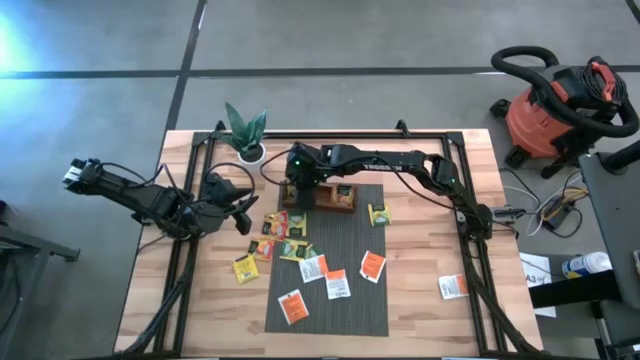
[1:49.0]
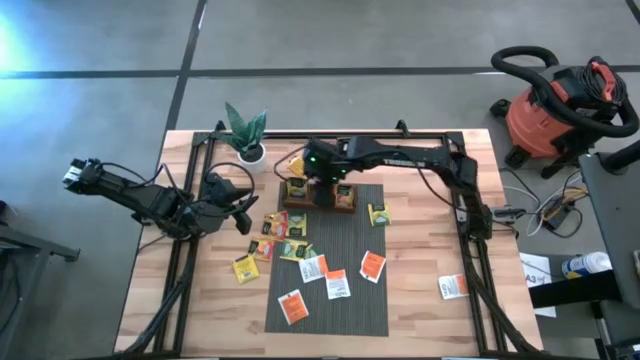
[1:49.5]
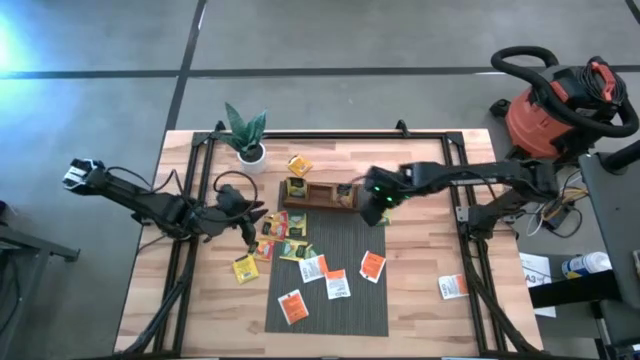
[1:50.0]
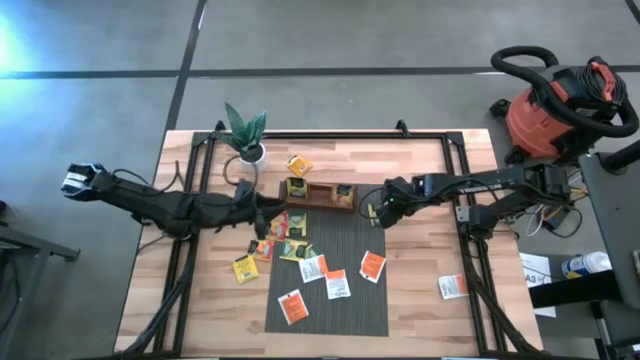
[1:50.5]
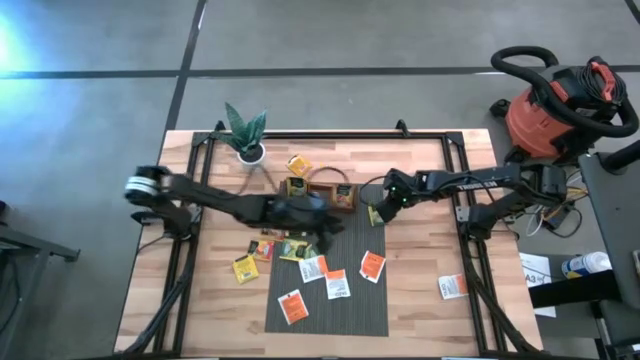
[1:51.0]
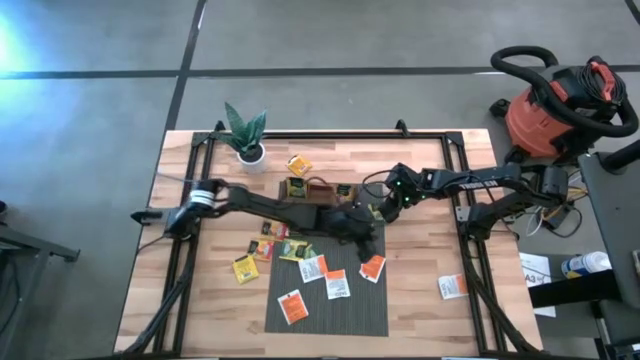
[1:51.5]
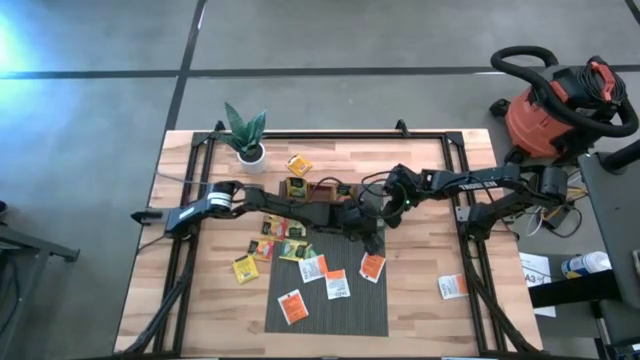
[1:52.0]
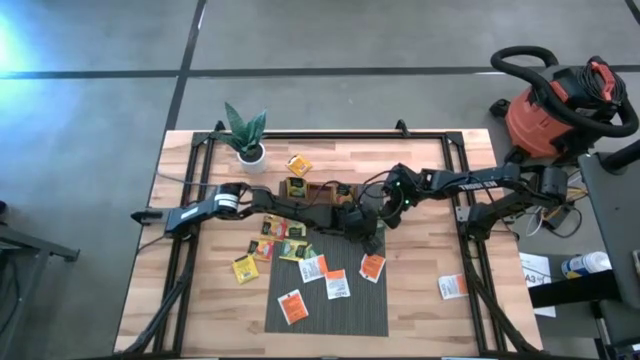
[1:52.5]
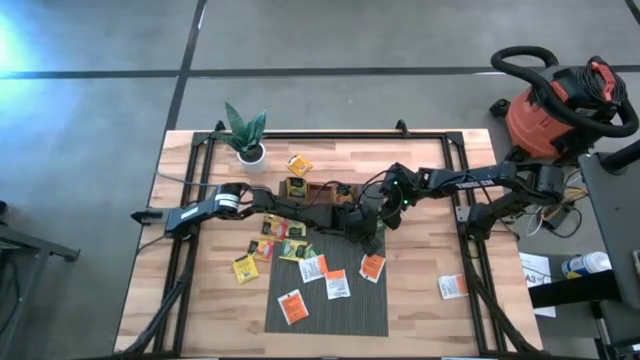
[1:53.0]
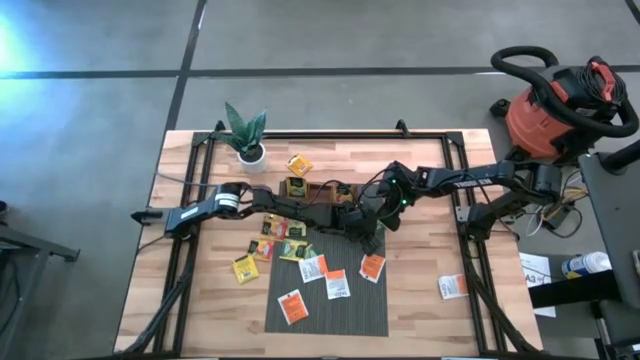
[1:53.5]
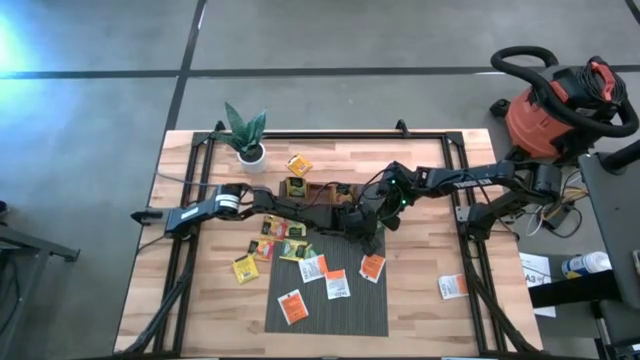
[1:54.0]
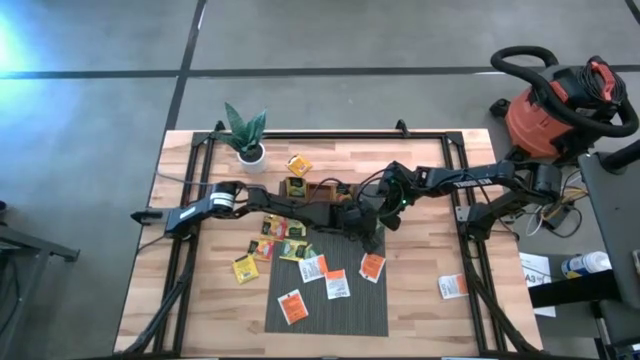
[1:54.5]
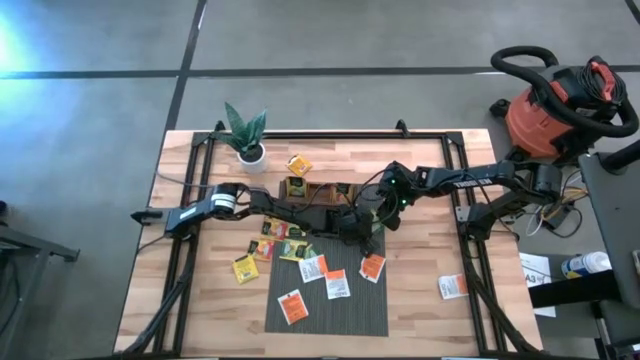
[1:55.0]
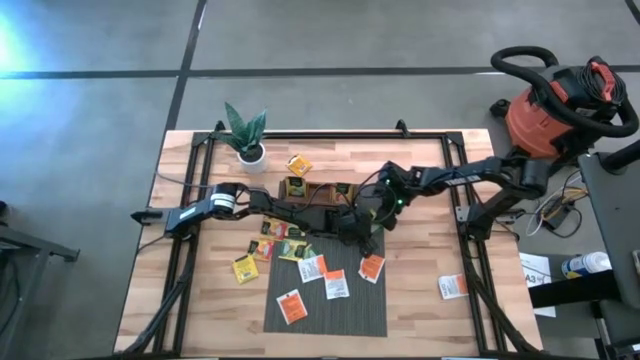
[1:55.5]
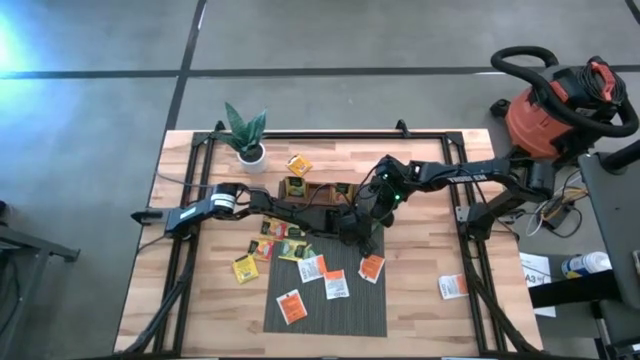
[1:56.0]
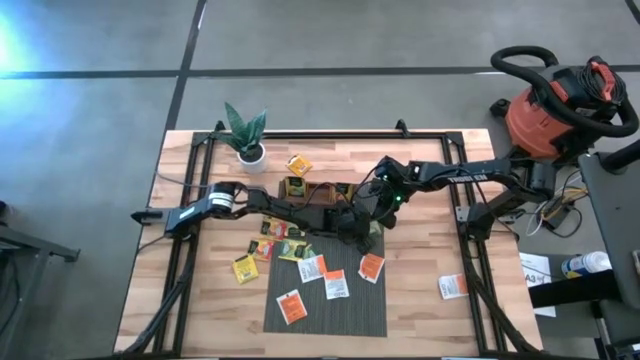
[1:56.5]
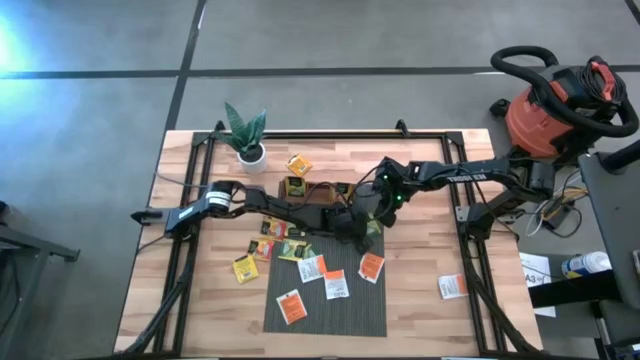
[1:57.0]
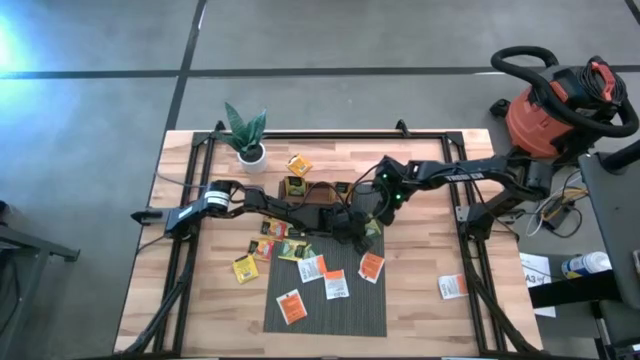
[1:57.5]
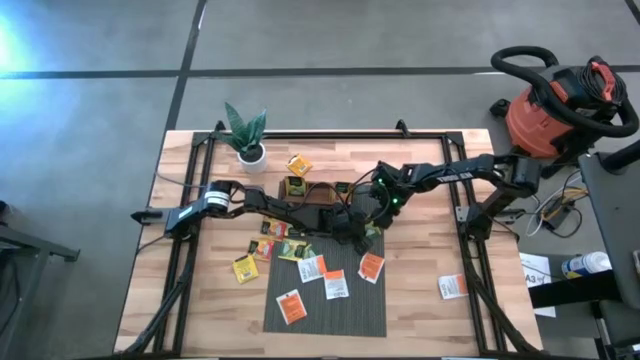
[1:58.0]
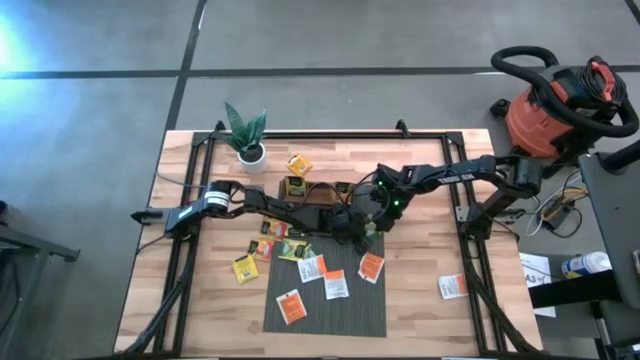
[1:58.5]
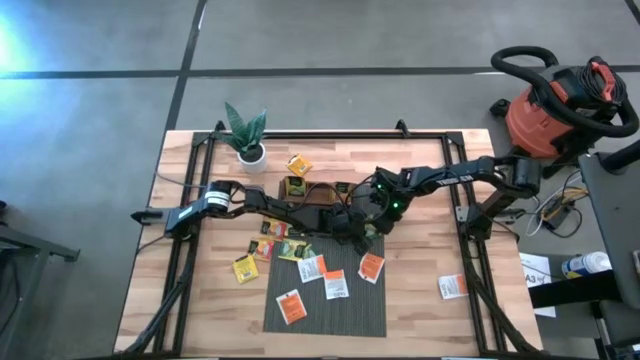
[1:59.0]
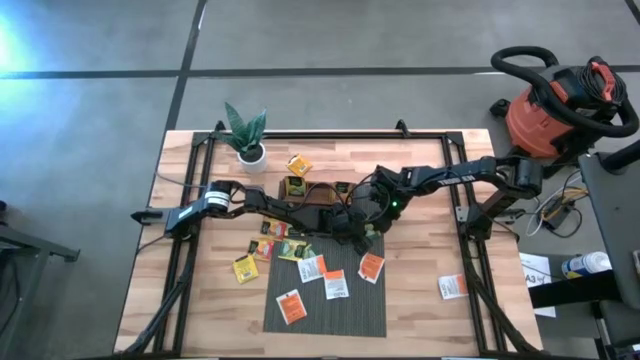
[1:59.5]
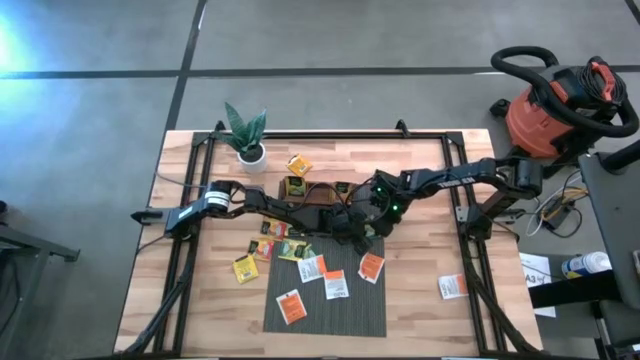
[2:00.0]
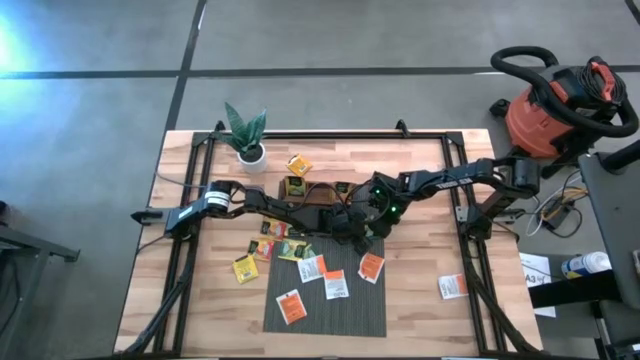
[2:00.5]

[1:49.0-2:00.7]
Task: Pick & Place Tea
Put the yellow tea bag into the left compartment of the wooden organizer

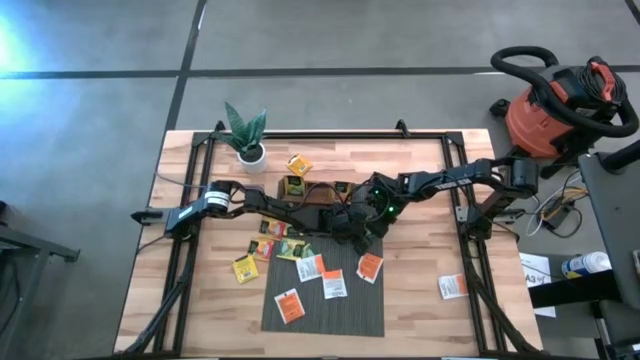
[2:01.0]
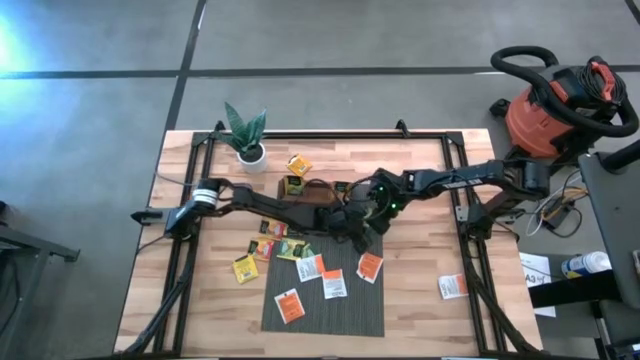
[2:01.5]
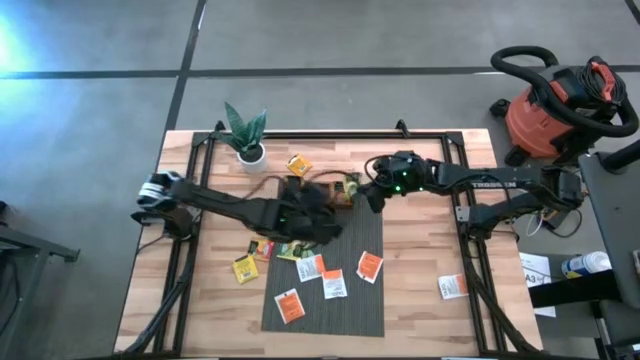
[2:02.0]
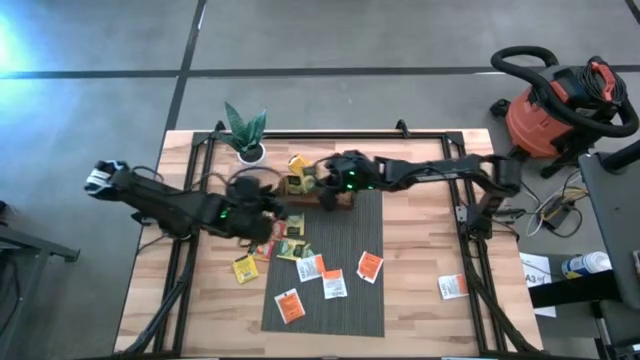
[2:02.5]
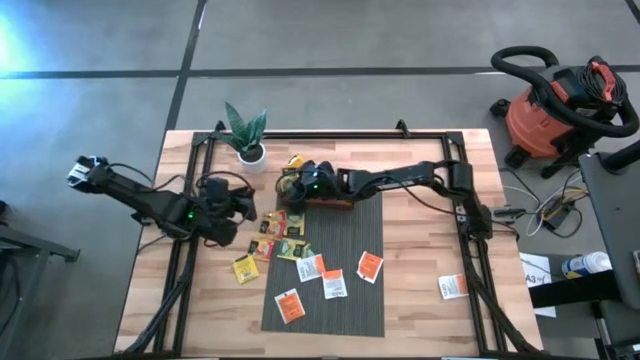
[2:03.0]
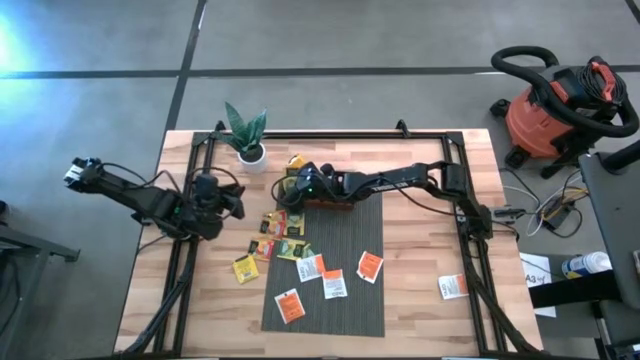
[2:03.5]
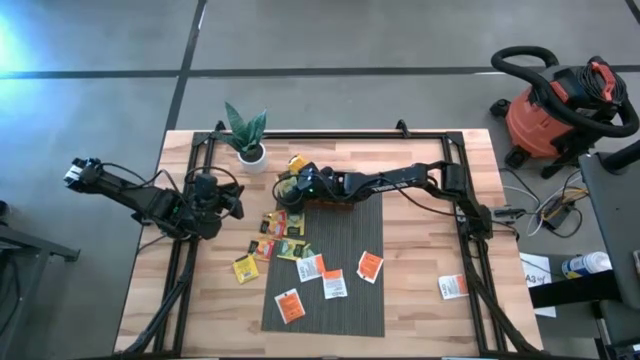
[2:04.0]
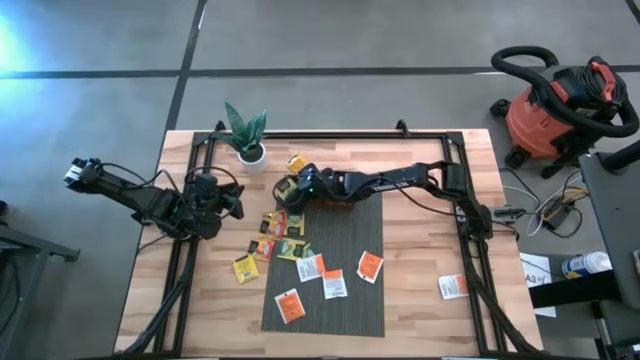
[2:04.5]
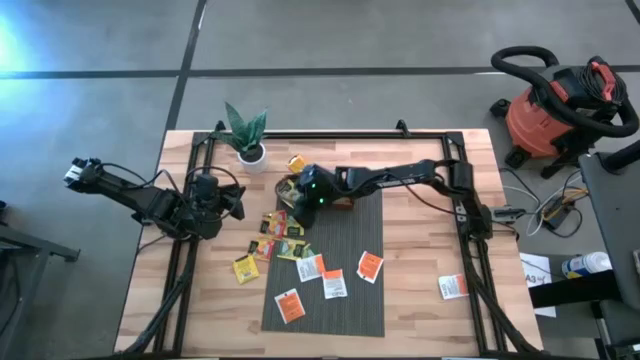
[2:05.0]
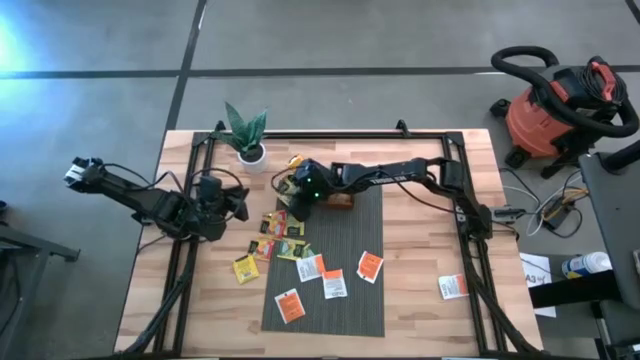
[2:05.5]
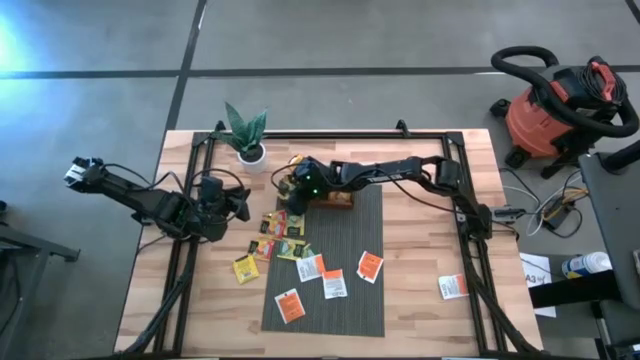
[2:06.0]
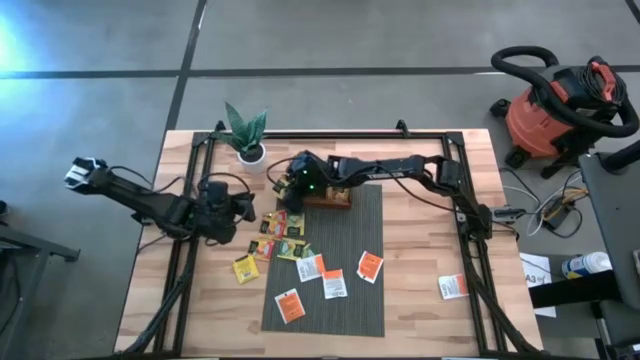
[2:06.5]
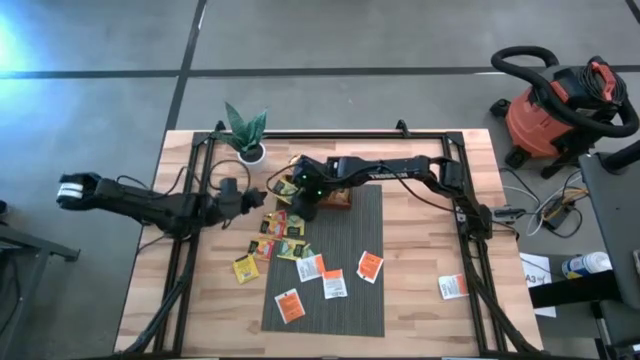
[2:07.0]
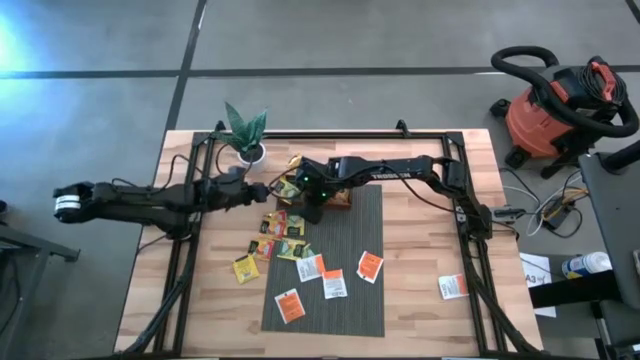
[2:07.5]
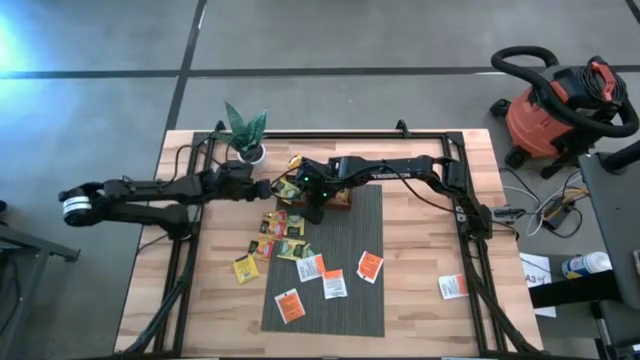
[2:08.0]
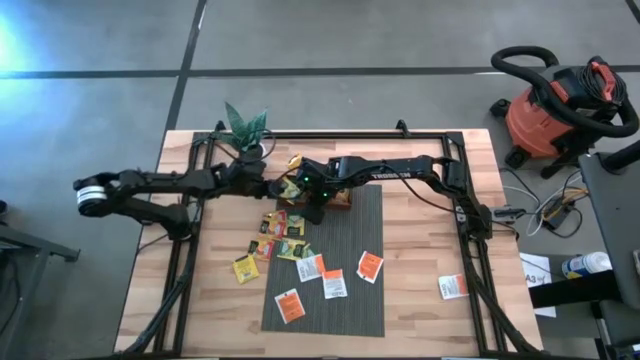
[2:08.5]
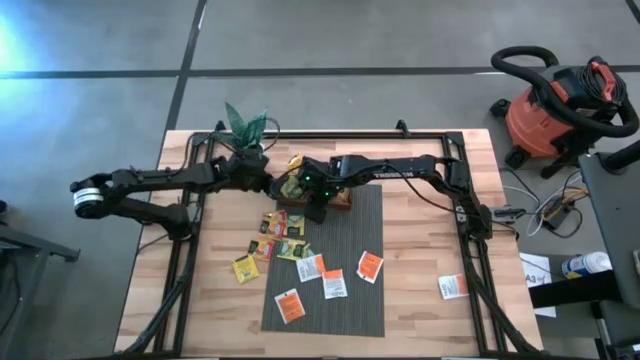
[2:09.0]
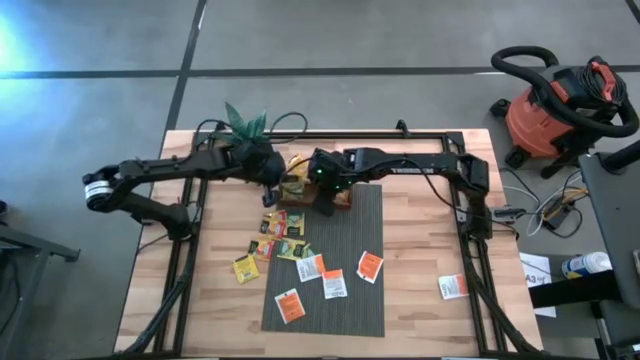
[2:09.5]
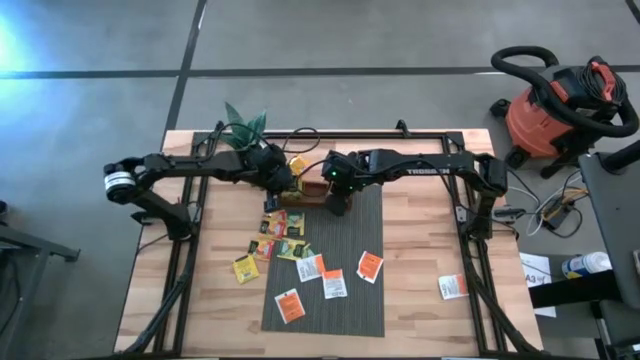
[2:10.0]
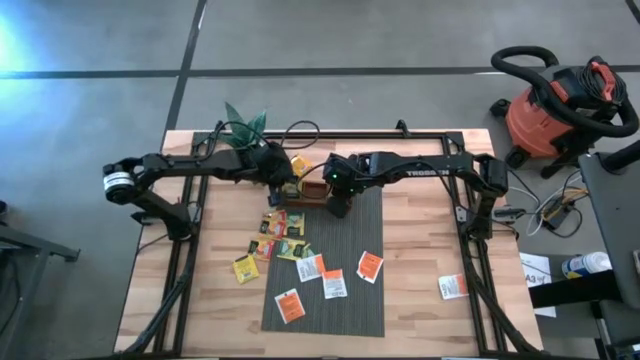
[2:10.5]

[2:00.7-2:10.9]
Put the yellow tea bag into the left compartment of the wooden organizer

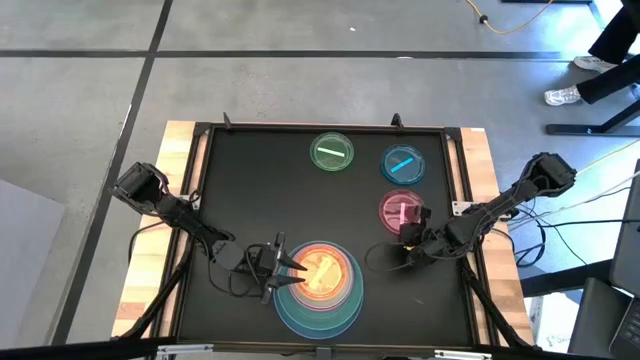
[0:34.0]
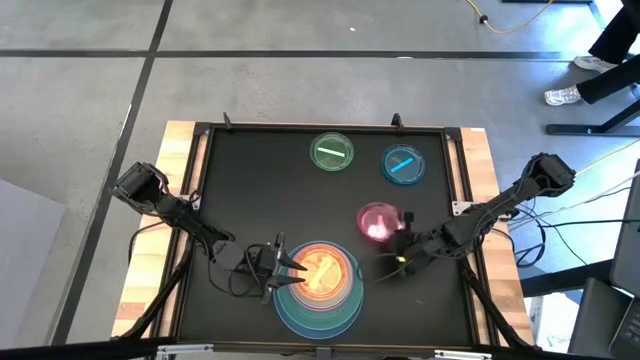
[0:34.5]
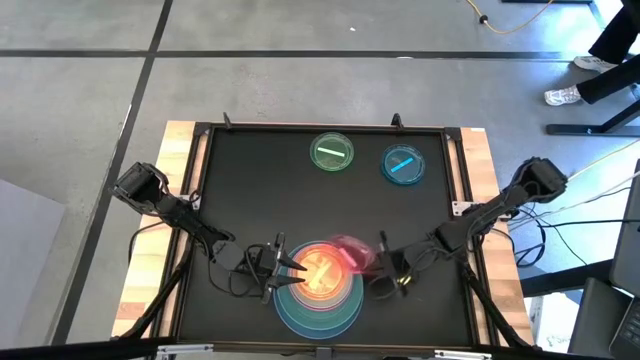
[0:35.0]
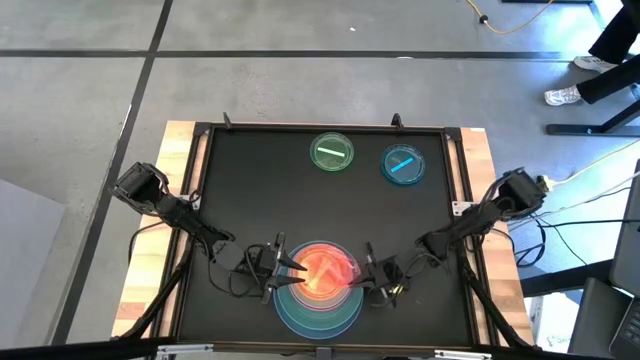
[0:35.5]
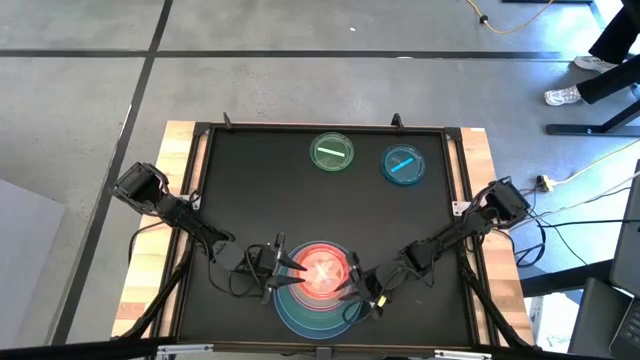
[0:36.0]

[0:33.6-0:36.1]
Task: Stack plastic plates
Stack the light pink plate on the orange plate
